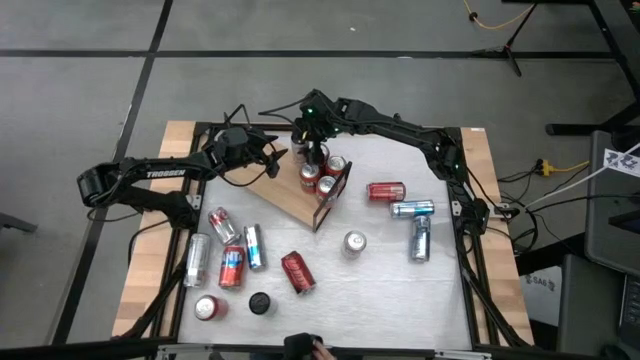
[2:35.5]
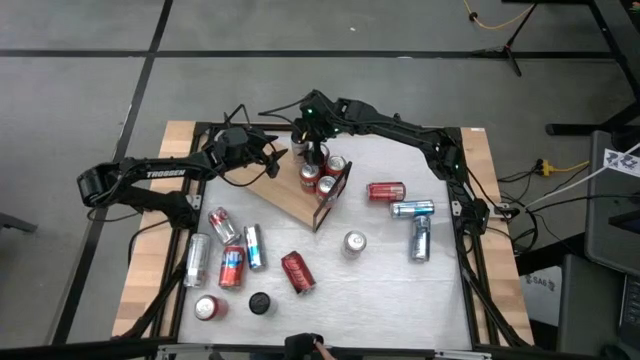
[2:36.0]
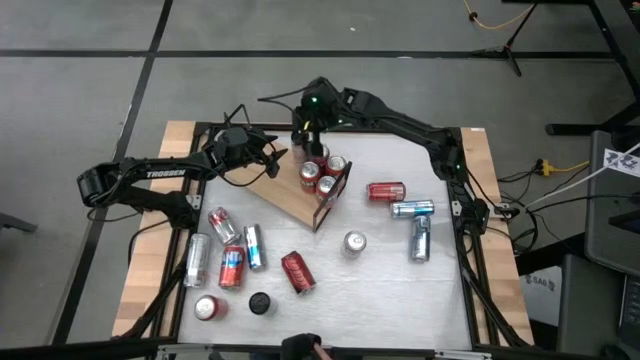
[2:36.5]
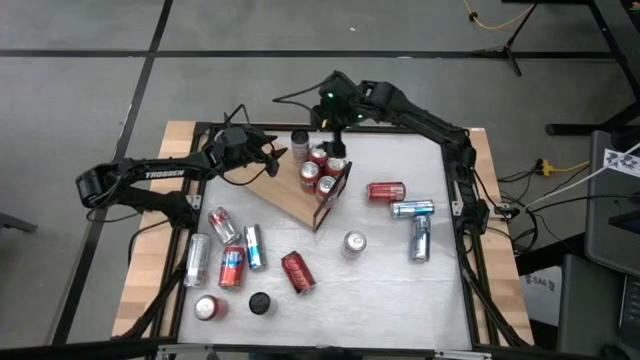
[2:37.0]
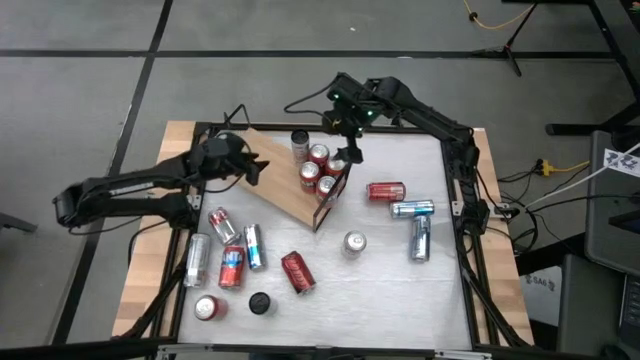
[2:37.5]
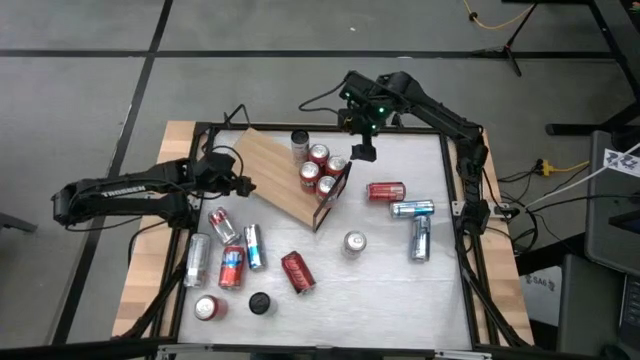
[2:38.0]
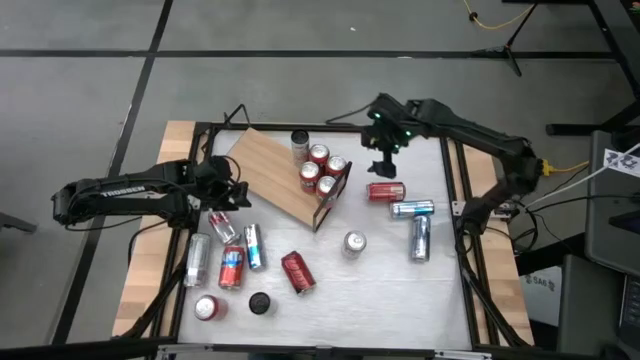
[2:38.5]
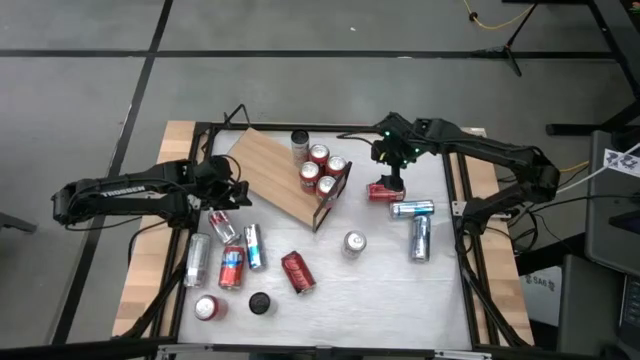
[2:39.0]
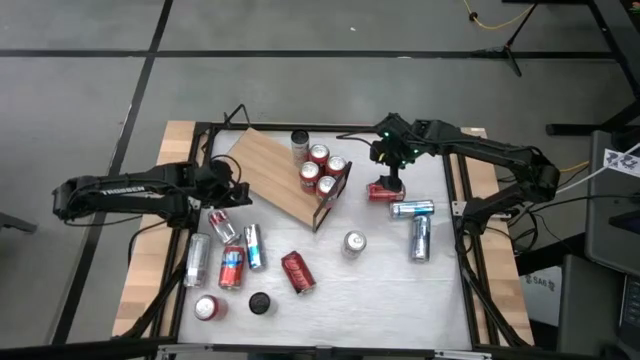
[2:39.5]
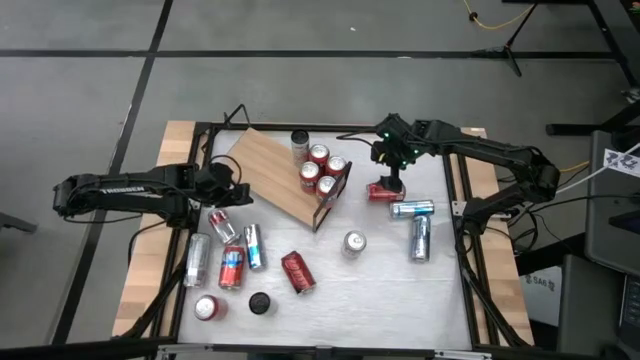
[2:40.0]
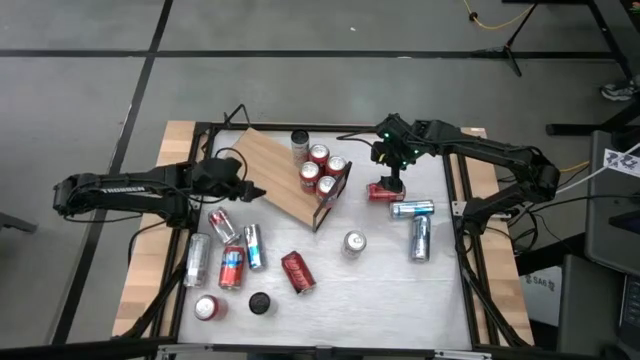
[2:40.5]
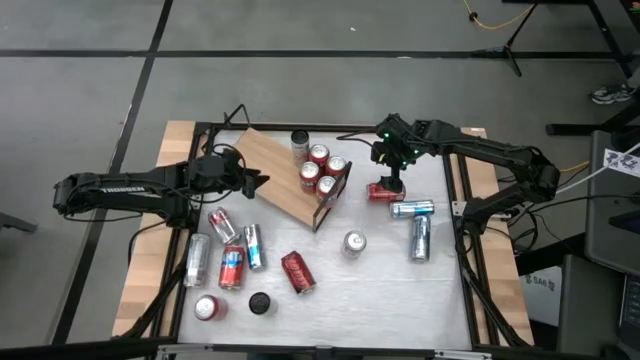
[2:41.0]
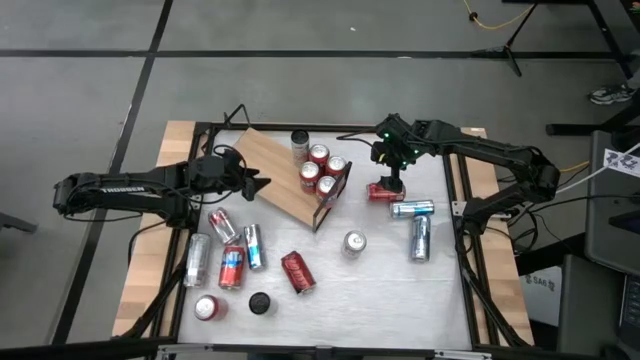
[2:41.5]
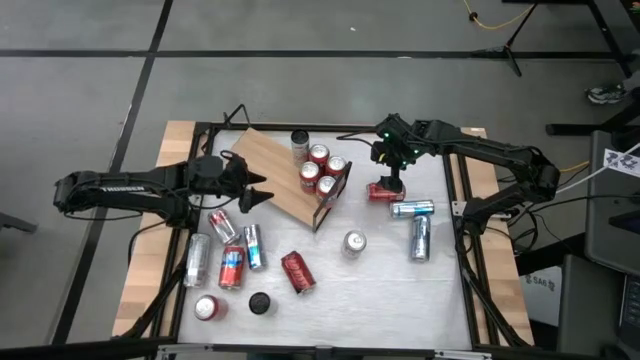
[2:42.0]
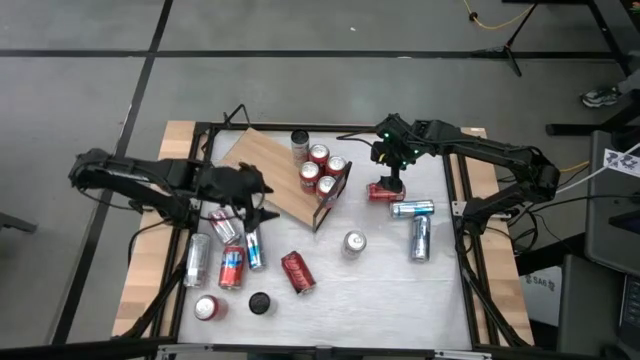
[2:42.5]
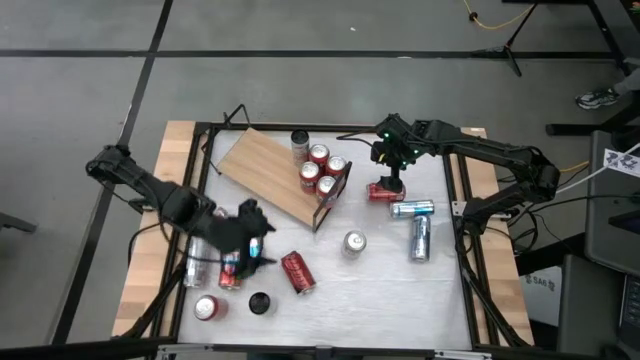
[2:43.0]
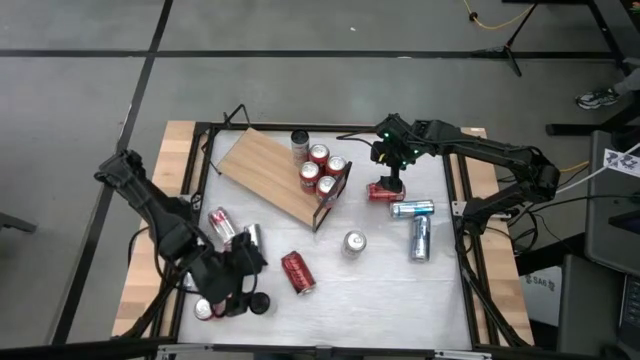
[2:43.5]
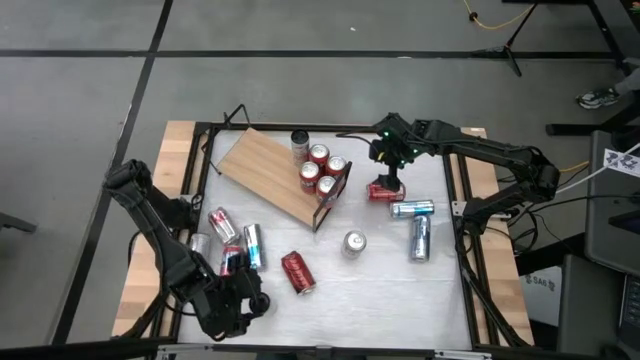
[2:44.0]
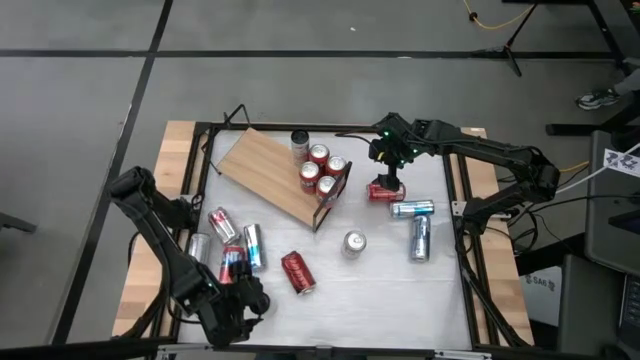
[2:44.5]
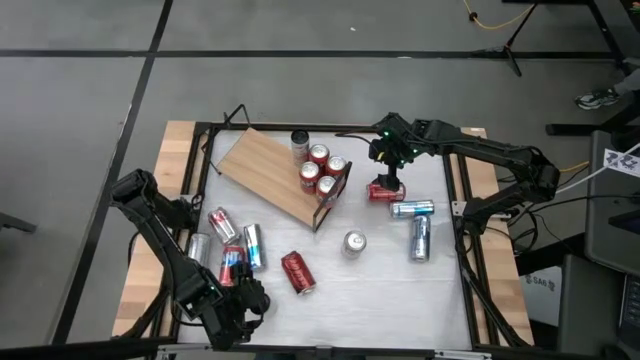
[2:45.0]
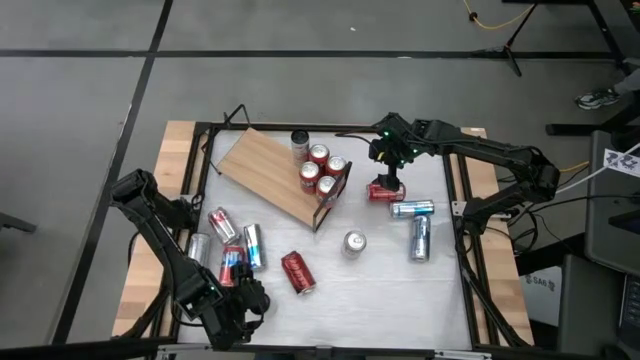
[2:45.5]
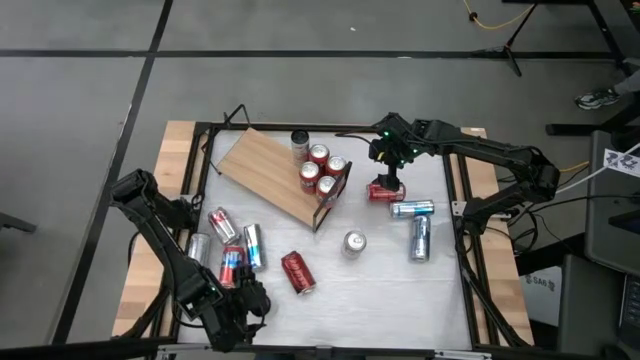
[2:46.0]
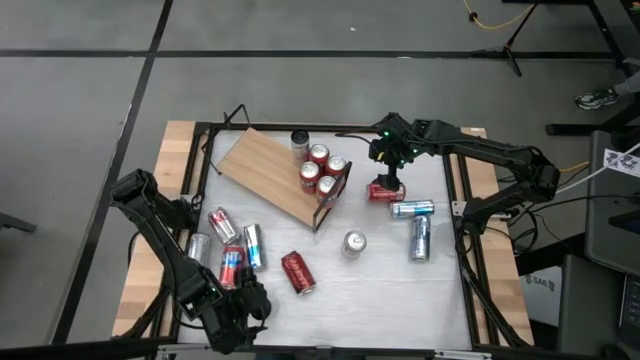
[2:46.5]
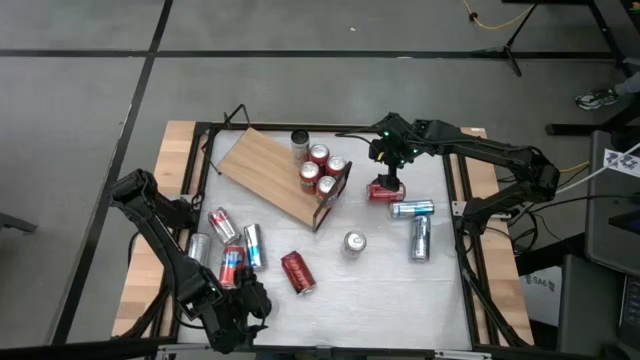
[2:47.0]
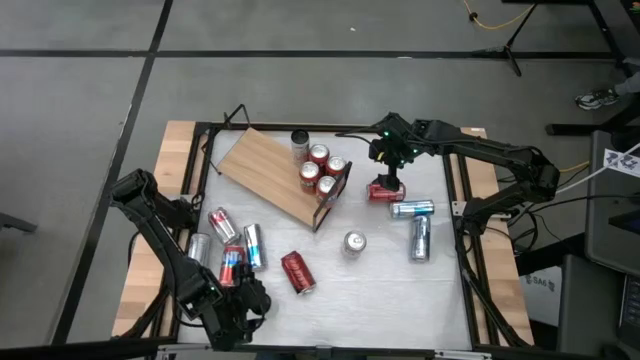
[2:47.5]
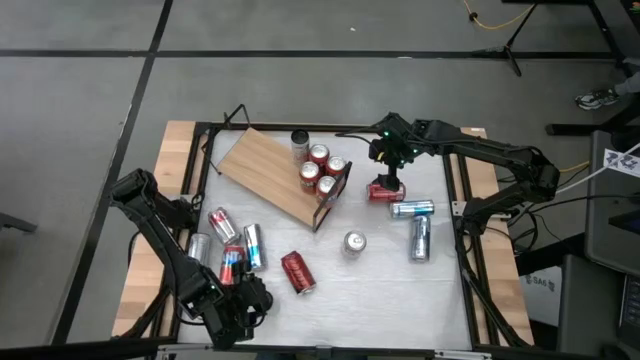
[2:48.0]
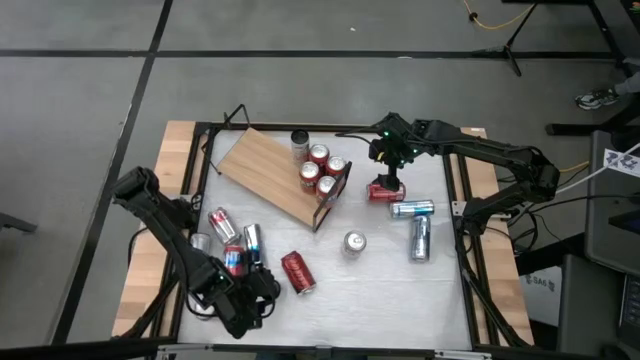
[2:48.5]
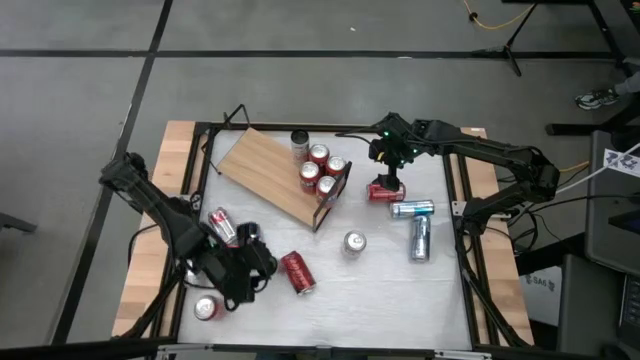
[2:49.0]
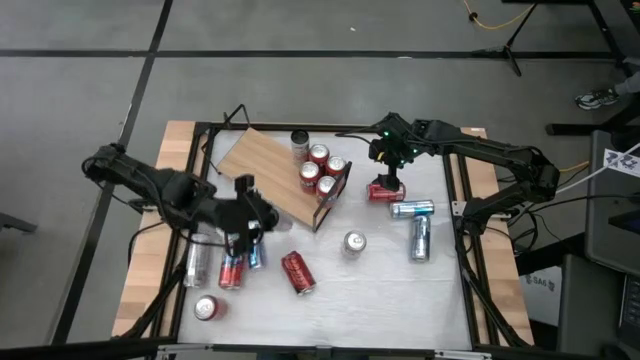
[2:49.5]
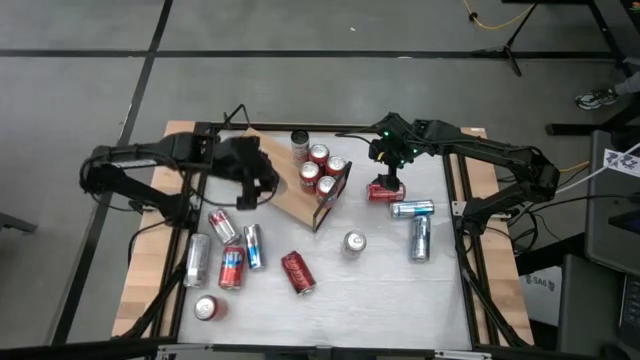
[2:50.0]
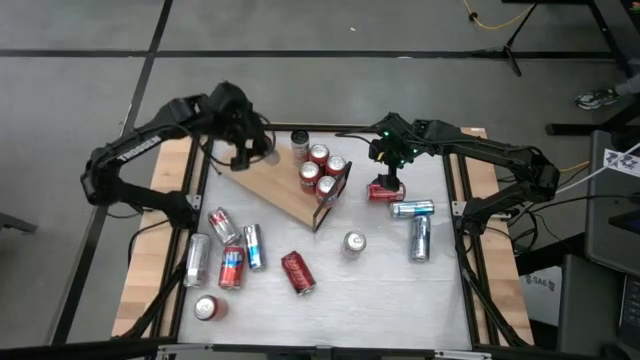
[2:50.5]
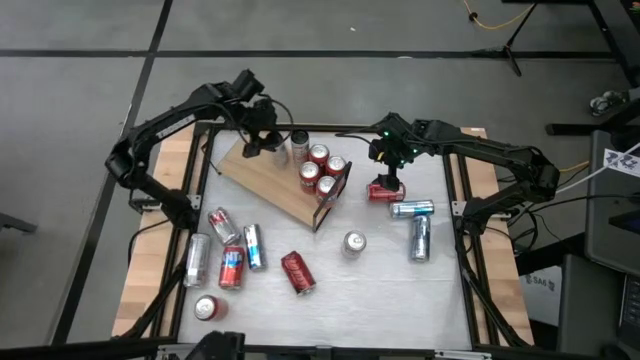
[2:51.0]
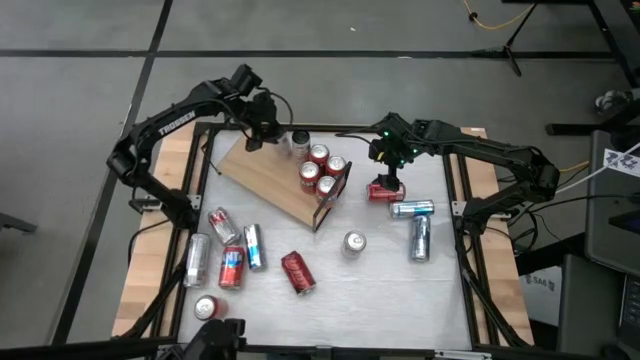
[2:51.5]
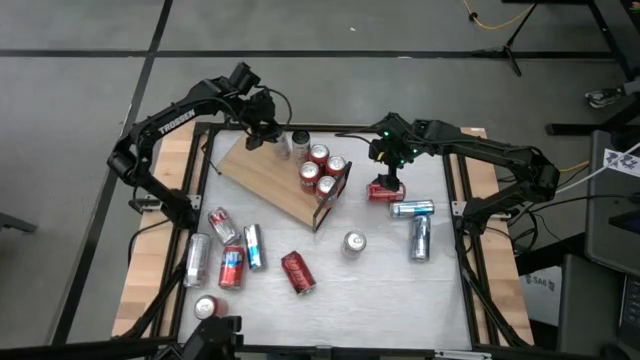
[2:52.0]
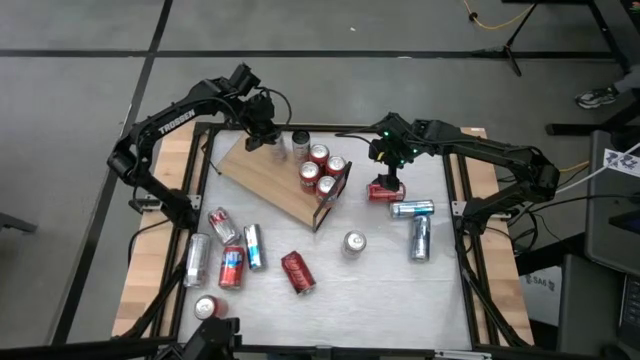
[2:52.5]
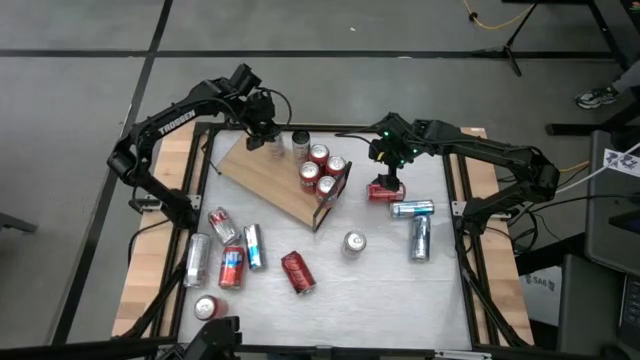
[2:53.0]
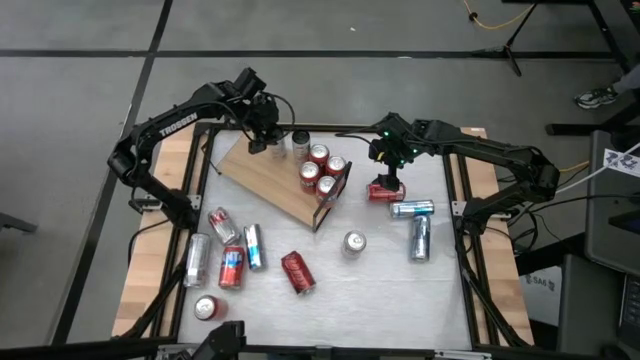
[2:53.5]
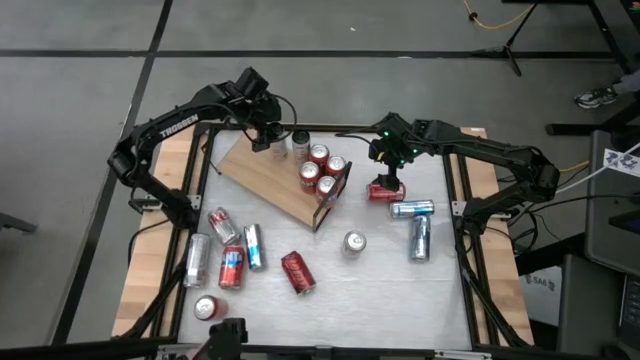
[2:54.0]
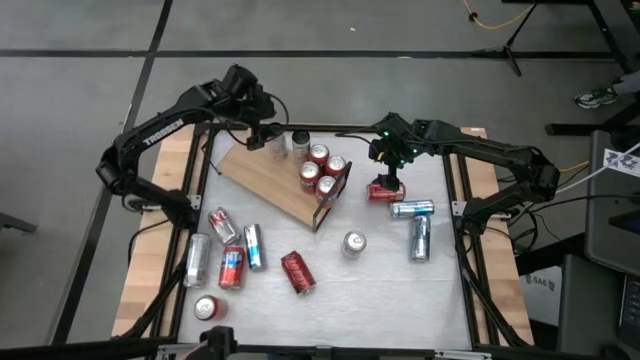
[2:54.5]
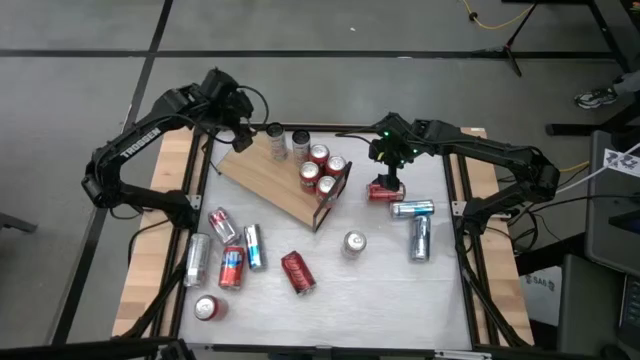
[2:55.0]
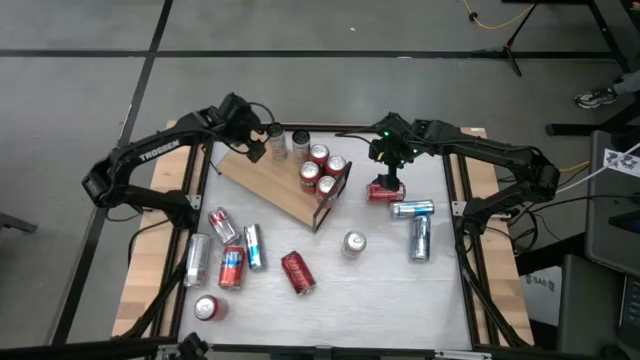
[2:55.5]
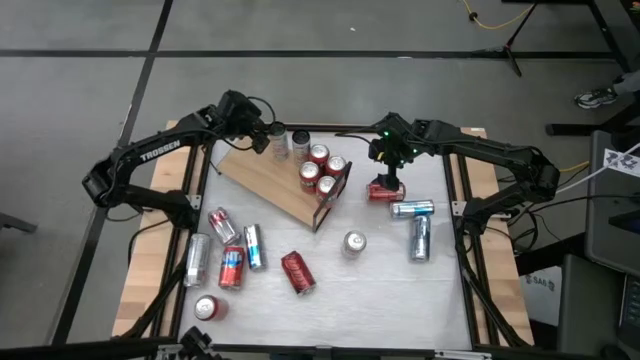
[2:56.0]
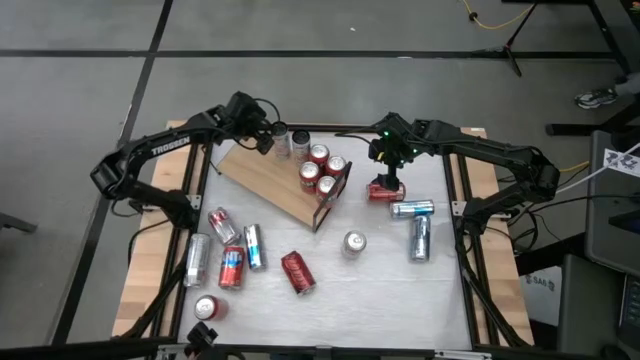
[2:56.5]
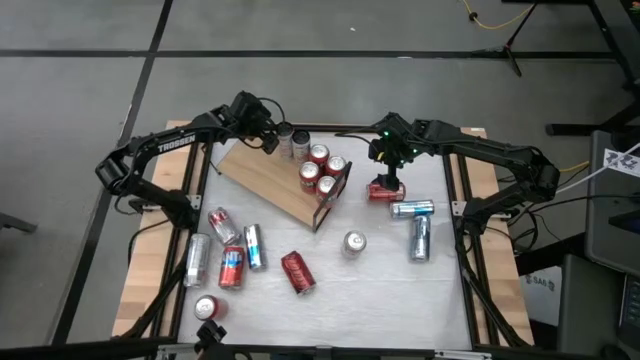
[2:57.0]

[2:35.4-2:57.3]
Task: Pick and place cans onto a shelf
Put the right pink and white soda can on the shelf aligned with the other right pink and white soda can
